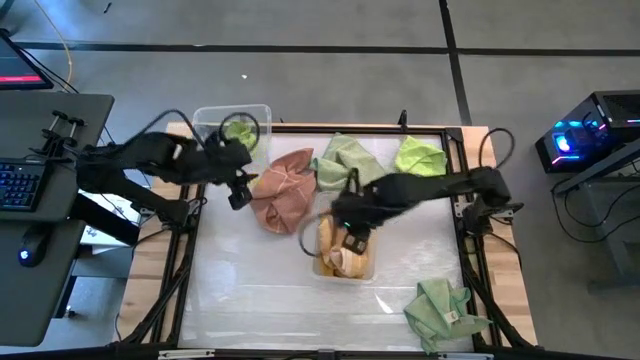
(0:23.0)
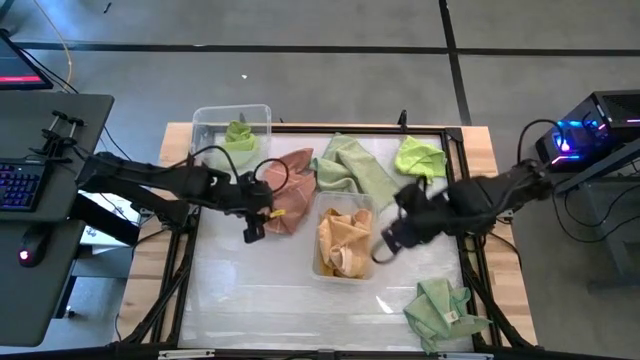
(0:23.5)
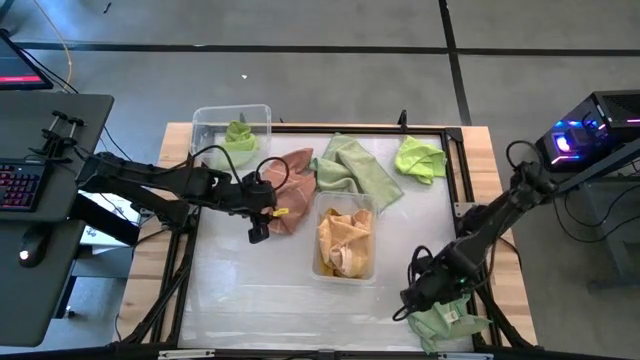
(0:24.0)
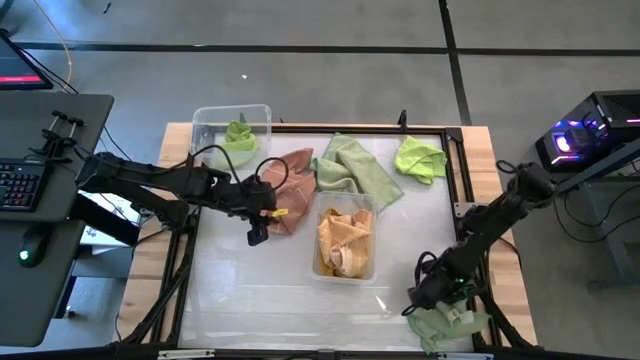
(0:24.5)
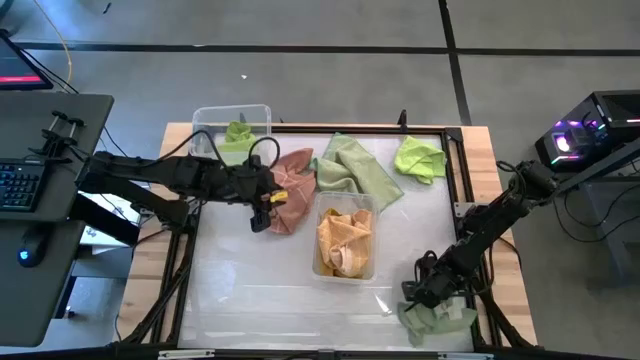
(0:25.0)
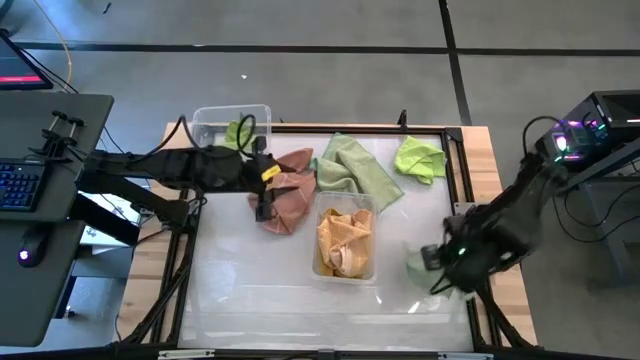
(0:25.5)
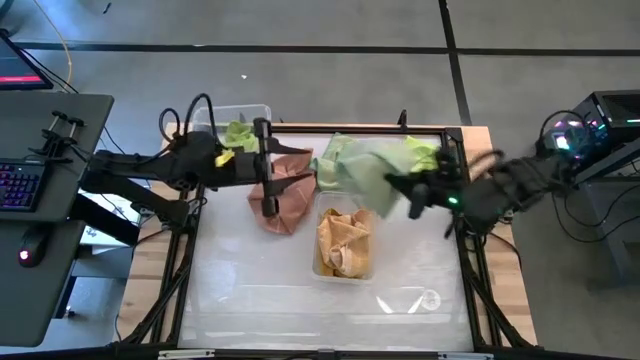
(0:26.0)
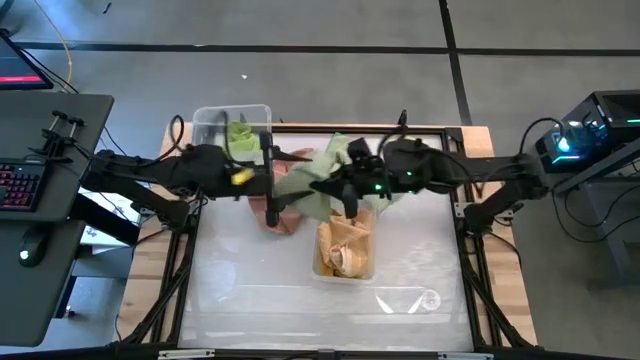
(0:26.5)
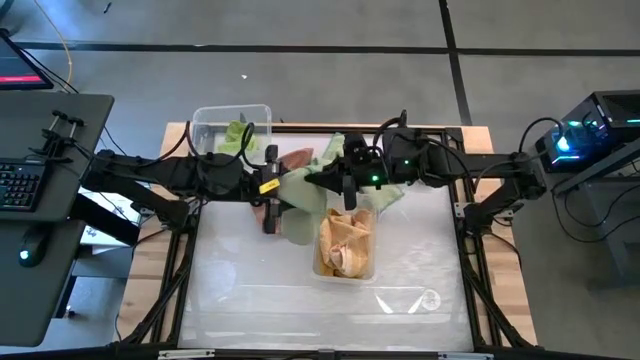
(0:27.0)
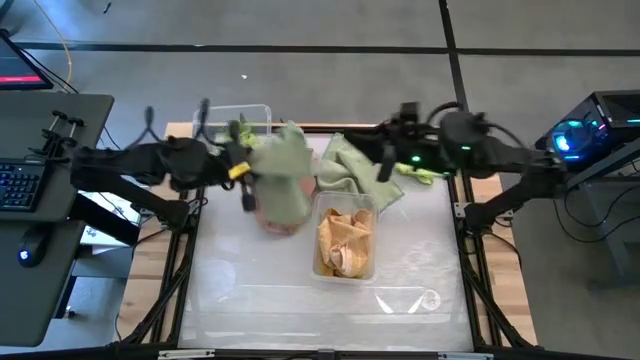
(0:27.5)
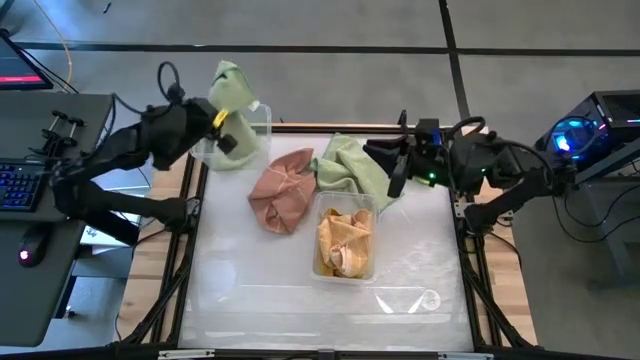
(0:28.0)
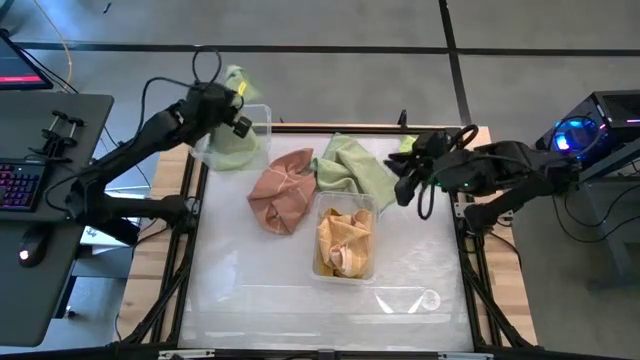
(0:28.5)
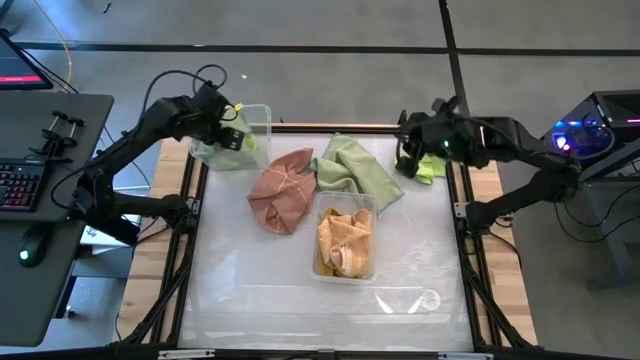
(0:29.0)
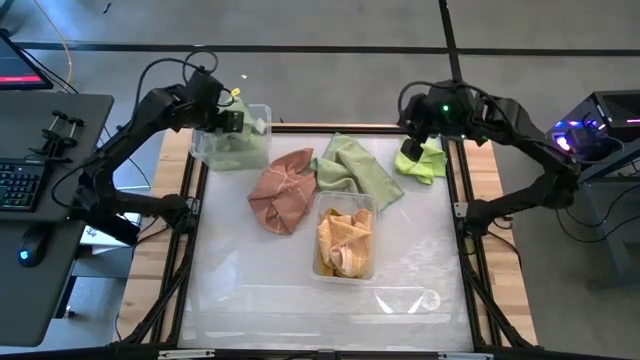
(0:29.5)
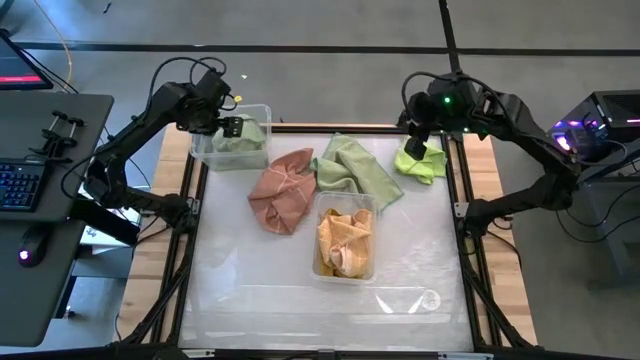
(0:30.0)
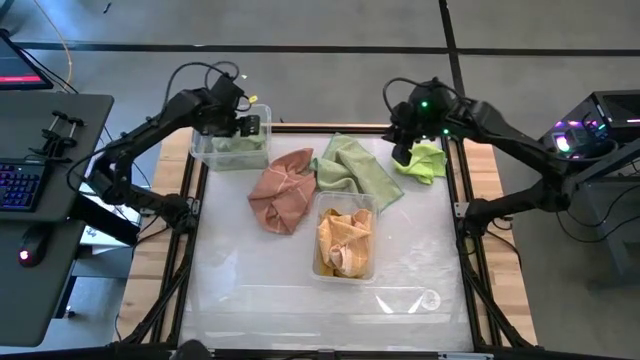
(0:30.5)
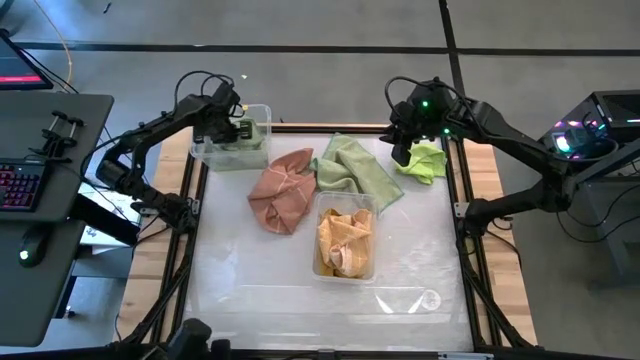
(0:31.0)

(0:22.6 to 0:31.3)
Task: Sort towels by color in basket
Put the bottom dark green towel into the top transparent bin

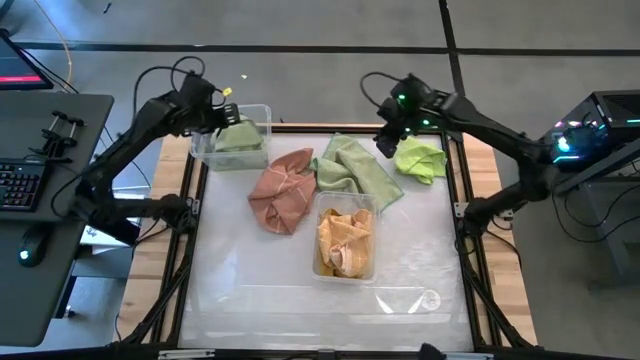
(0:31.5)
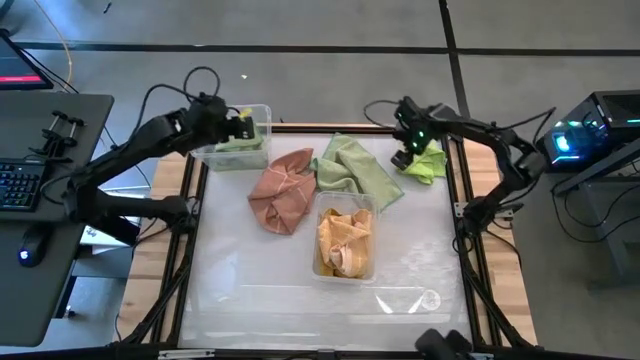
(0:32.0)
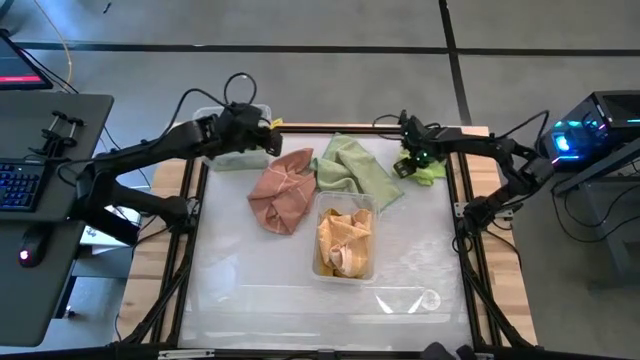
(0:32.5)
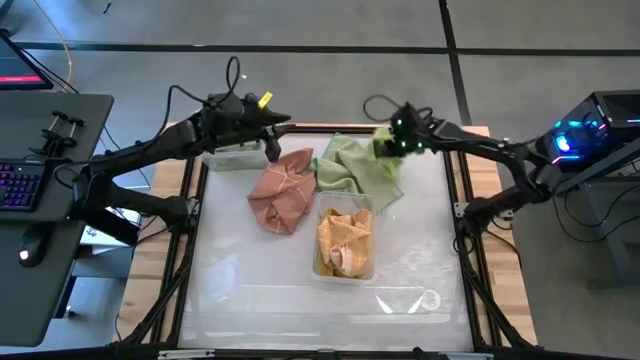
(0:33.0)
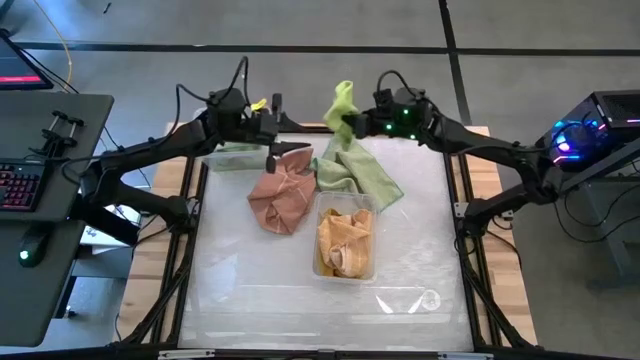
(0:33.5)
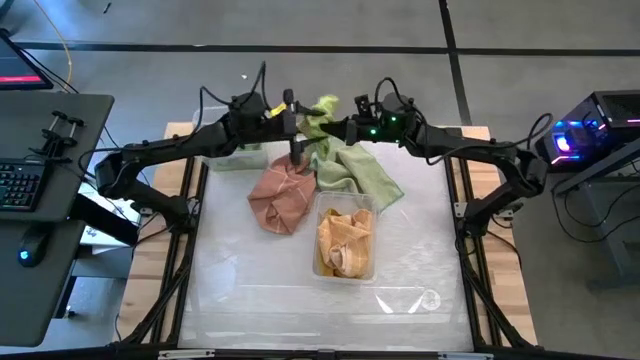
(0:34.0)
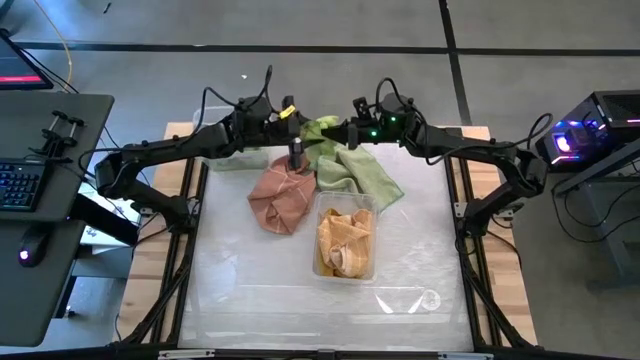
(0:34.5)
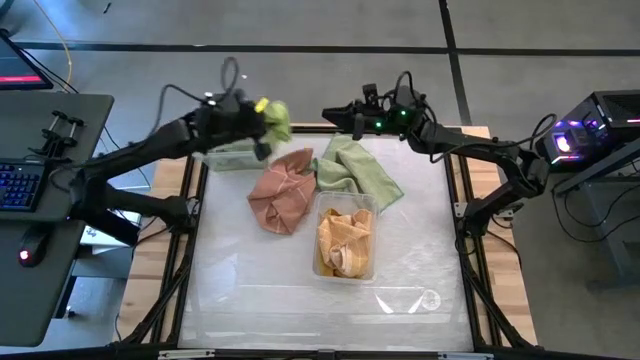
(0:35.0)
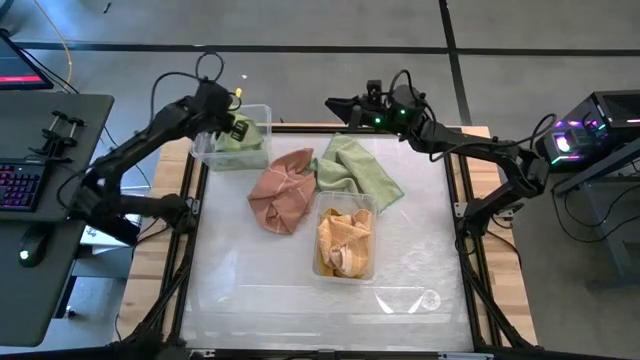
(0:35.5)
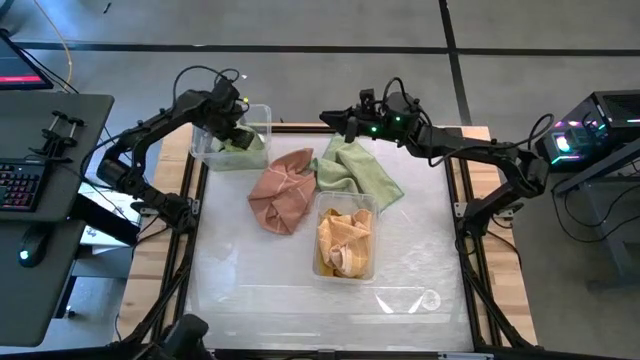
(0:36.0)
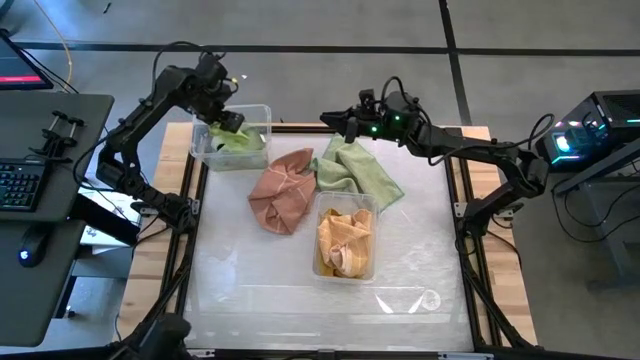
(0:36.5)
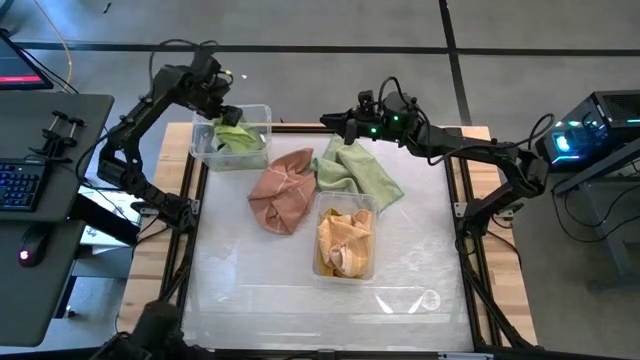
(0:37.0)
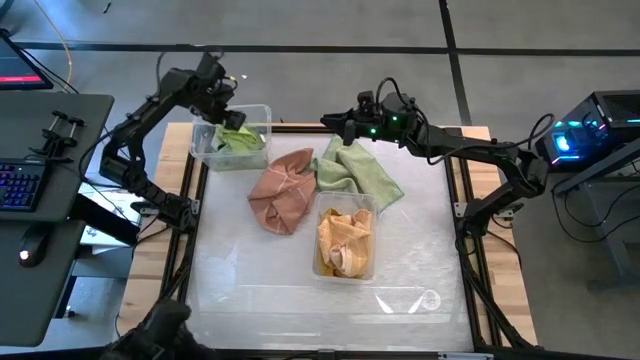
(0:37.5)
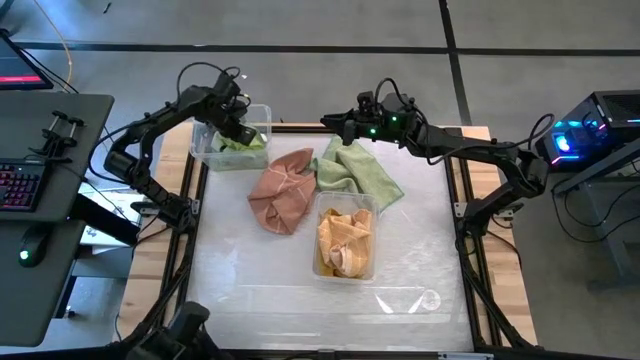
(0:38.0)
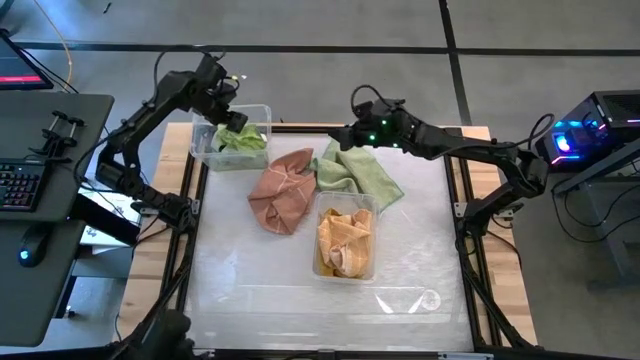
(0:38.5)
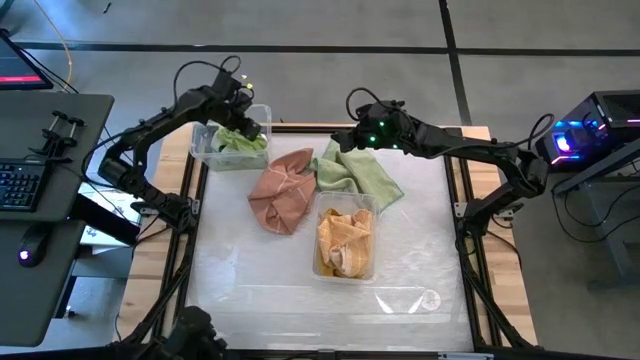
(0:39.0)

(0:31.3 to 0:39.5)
Put the green towel into the top transparent bin

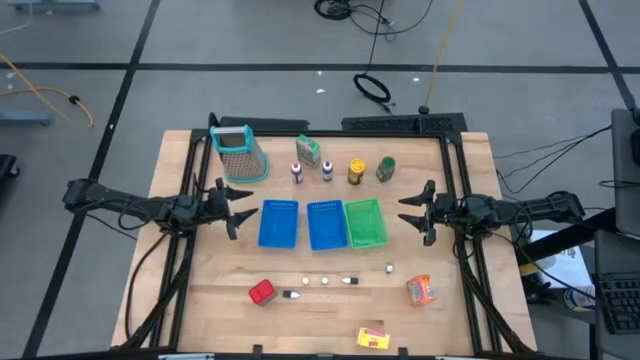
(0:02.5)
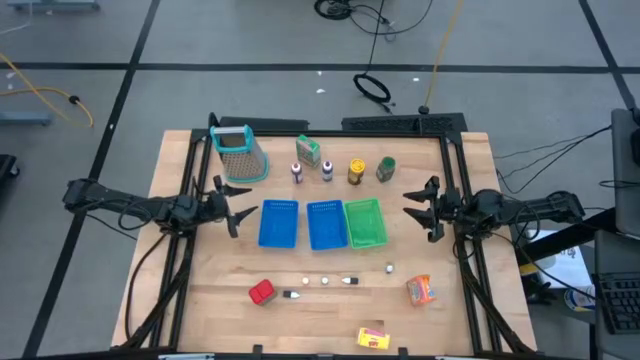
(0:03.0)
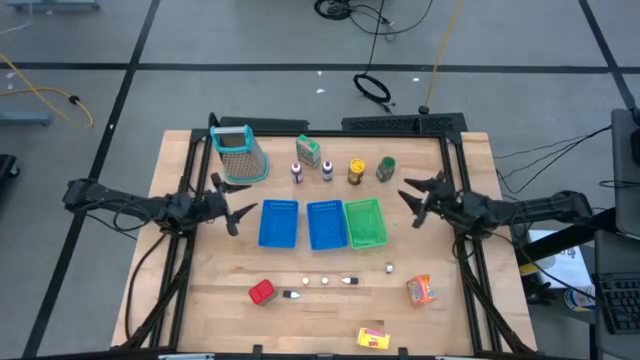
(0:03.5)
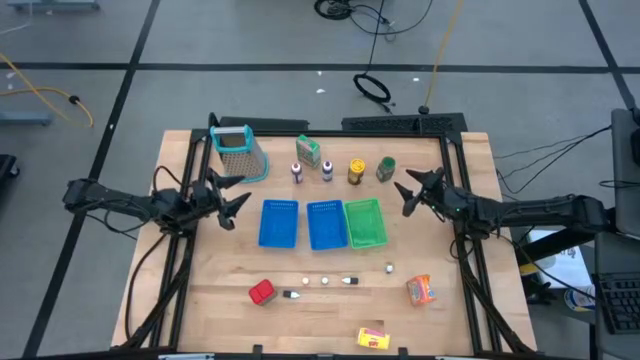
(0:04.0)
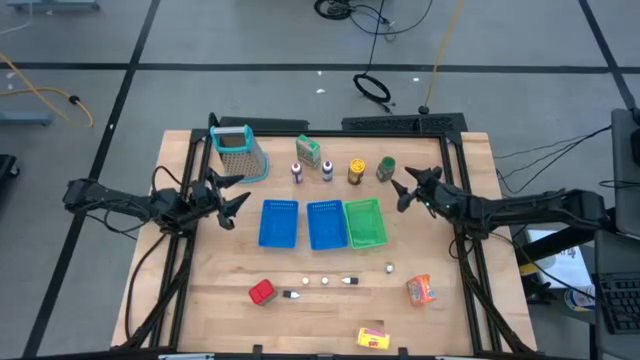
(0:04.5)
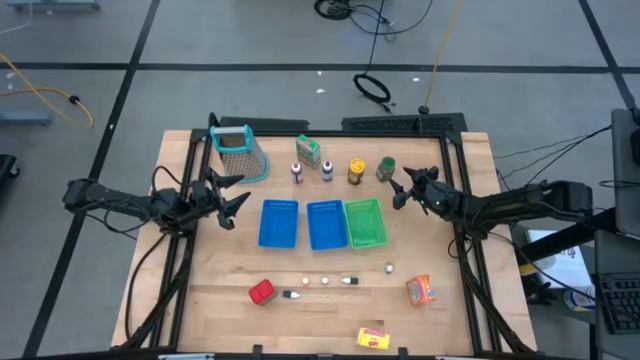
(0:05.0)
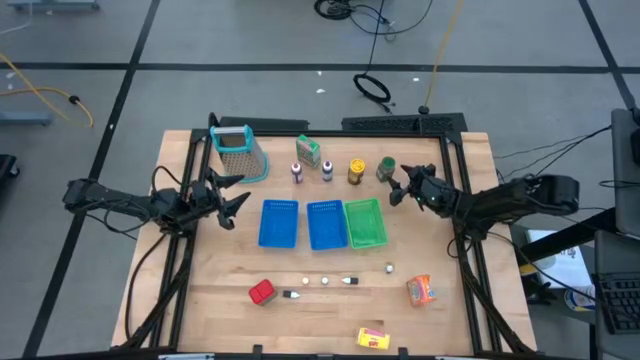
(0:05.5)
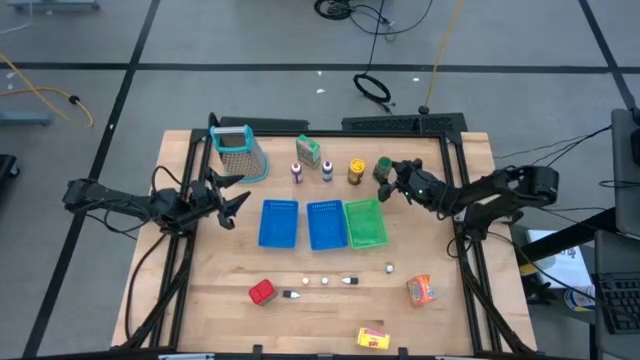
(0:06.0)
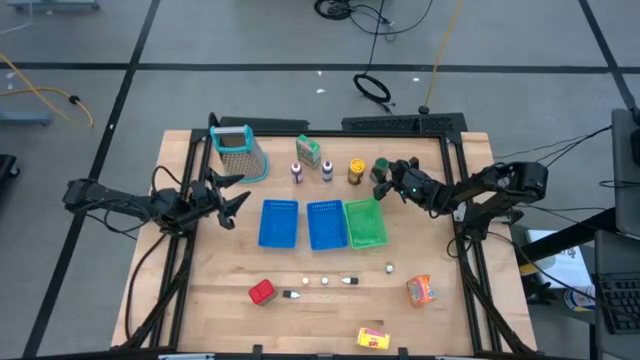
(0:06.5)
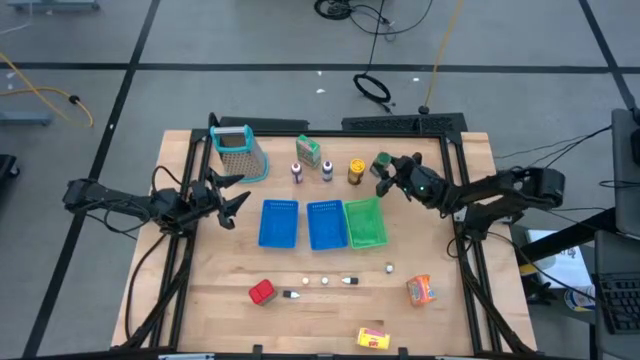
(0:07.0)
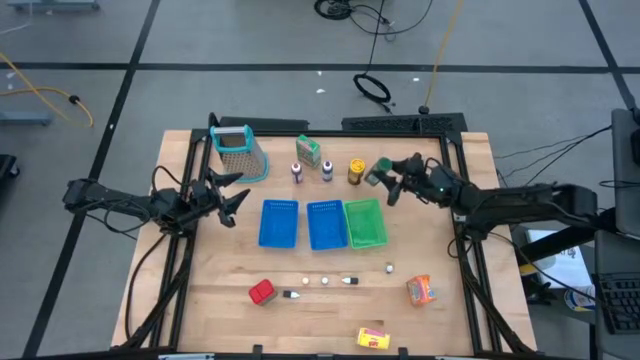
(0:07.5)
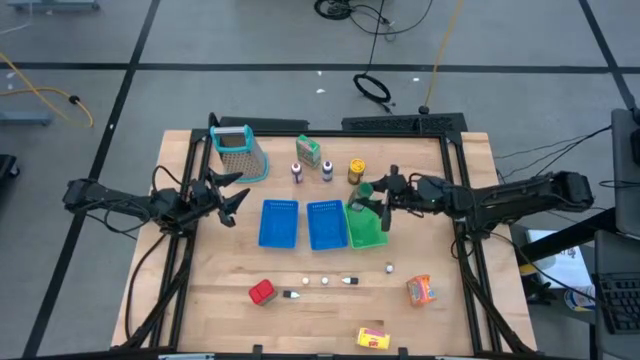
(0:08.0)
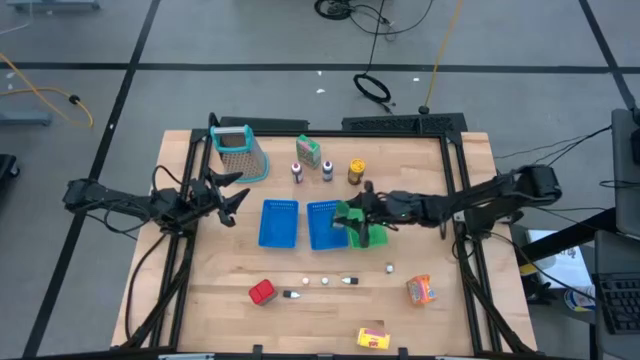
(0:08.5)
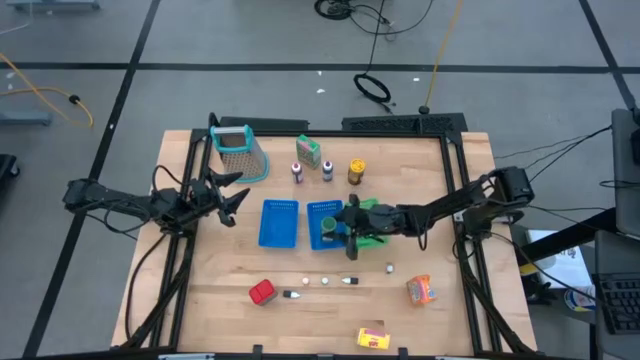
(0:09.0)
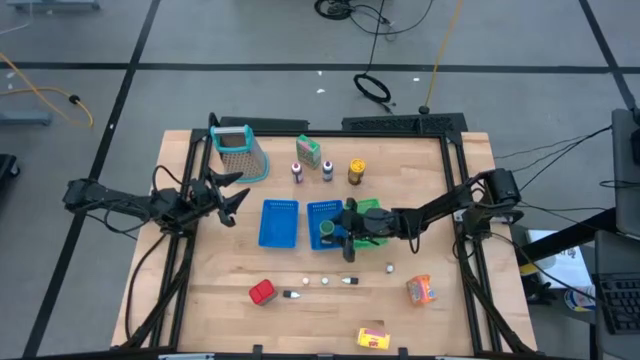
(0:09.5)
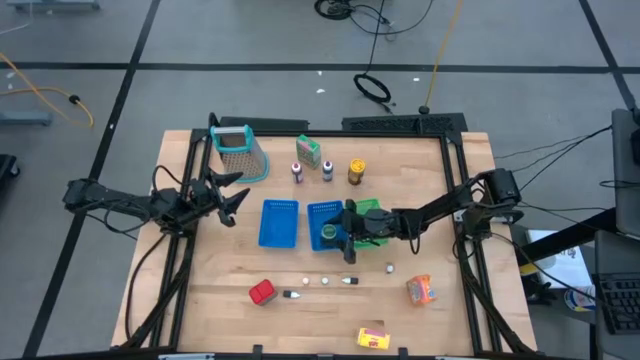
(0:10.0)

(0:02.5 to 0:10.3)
Task: Pick & Place Kitchen Items
Put the green spice bottle into the right blue bin
